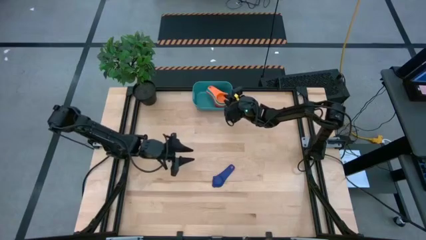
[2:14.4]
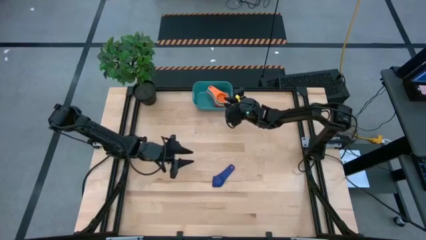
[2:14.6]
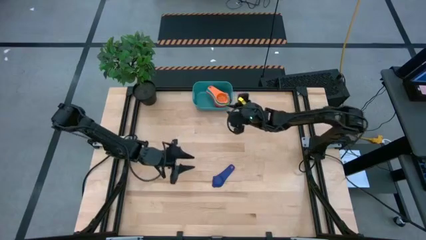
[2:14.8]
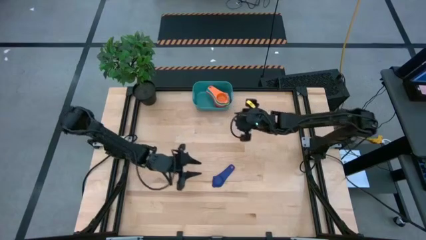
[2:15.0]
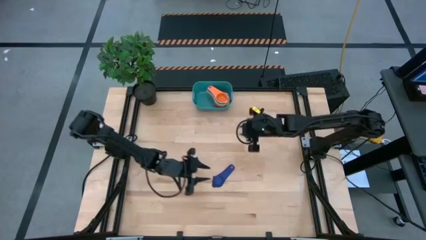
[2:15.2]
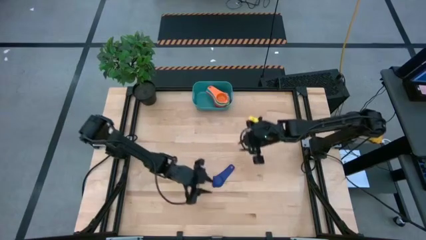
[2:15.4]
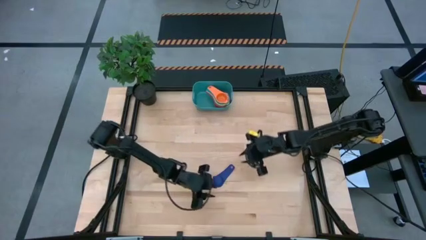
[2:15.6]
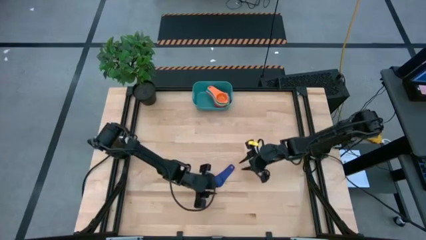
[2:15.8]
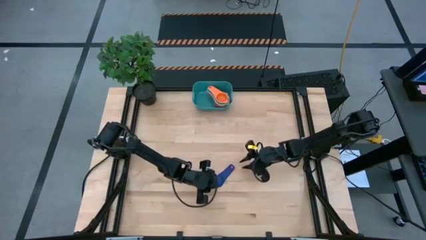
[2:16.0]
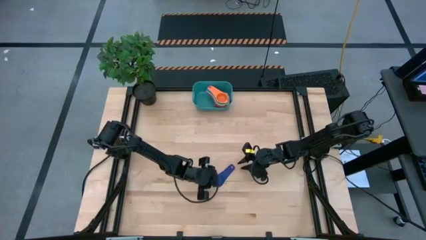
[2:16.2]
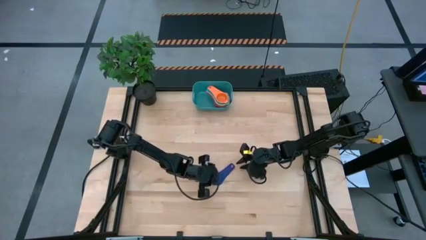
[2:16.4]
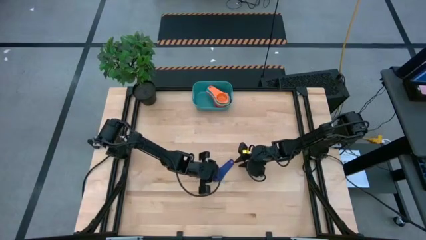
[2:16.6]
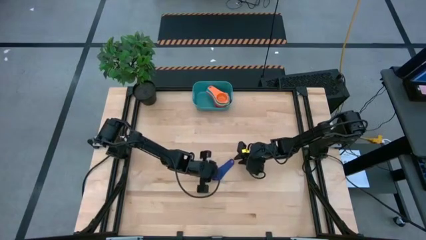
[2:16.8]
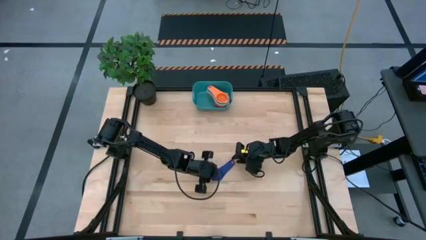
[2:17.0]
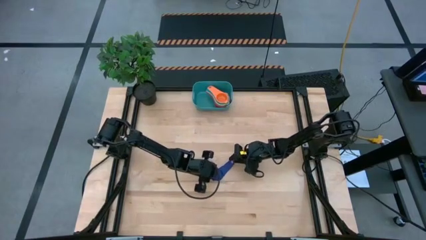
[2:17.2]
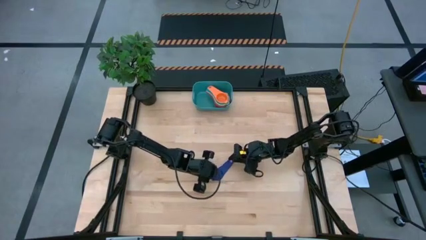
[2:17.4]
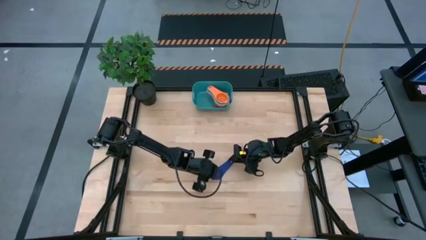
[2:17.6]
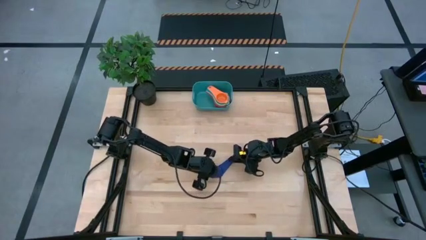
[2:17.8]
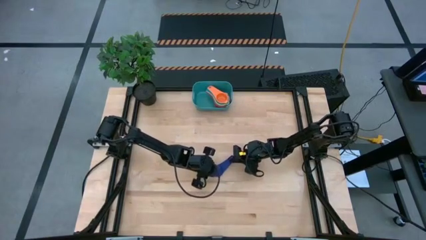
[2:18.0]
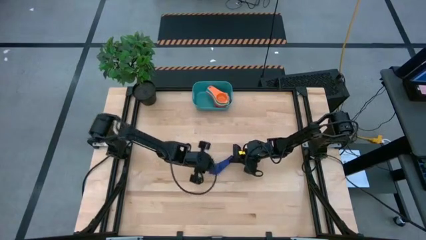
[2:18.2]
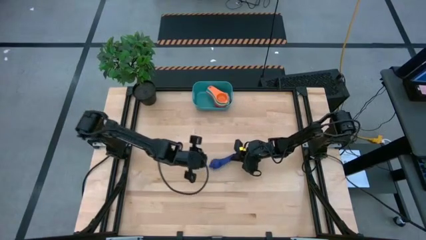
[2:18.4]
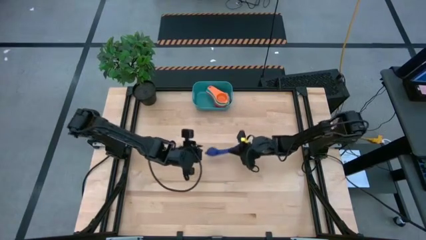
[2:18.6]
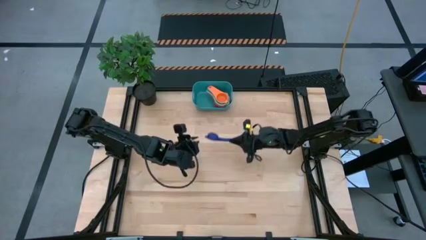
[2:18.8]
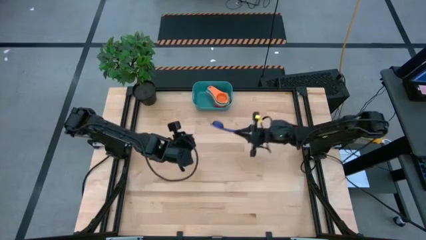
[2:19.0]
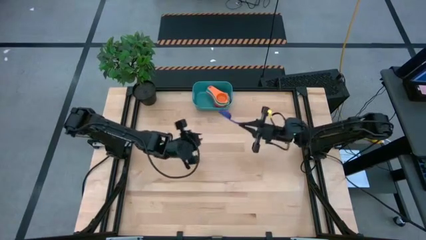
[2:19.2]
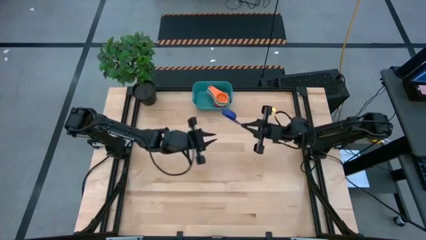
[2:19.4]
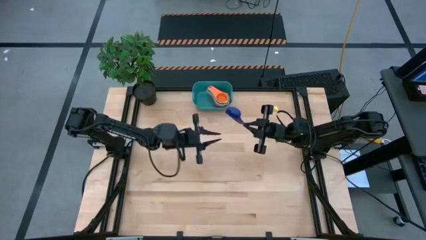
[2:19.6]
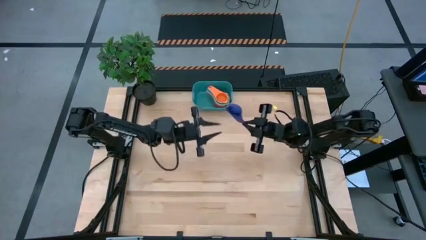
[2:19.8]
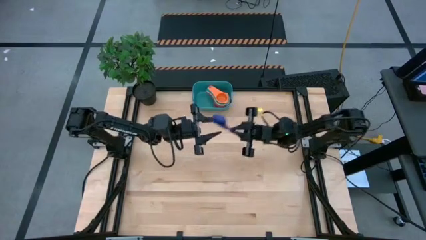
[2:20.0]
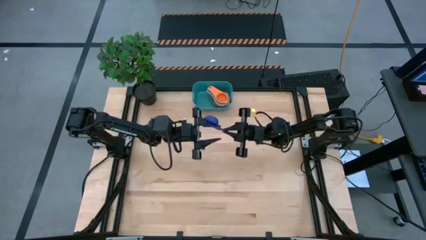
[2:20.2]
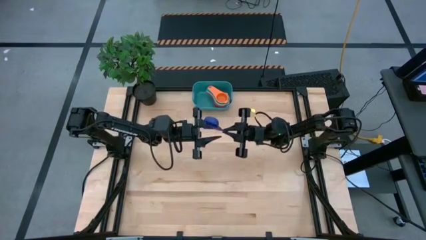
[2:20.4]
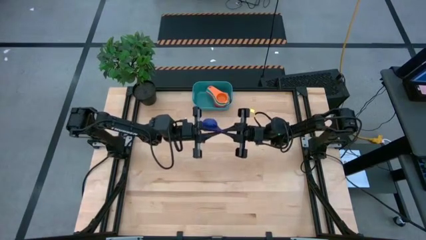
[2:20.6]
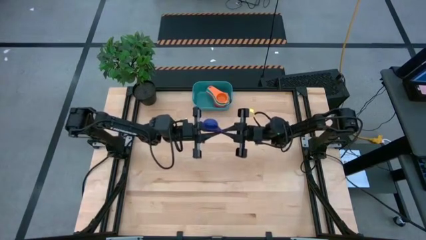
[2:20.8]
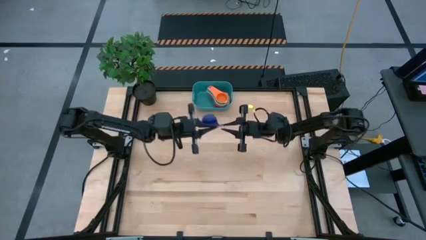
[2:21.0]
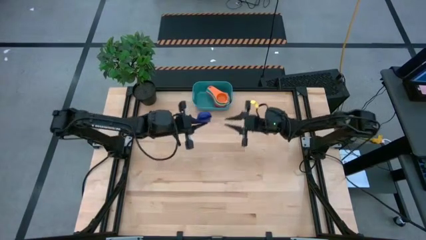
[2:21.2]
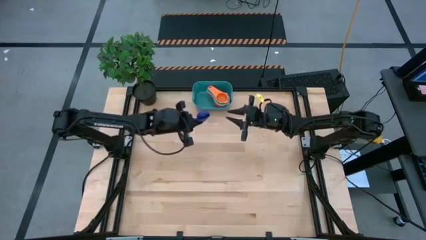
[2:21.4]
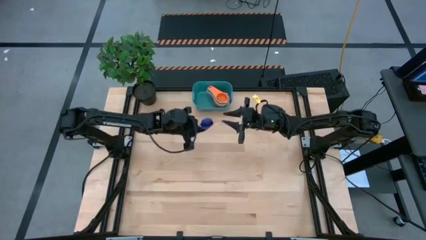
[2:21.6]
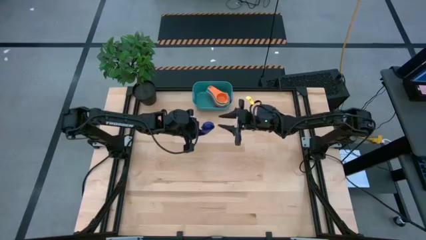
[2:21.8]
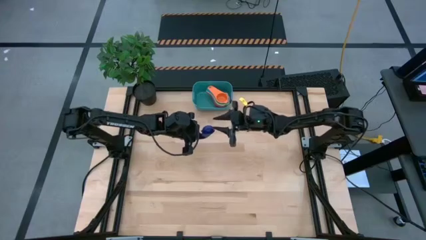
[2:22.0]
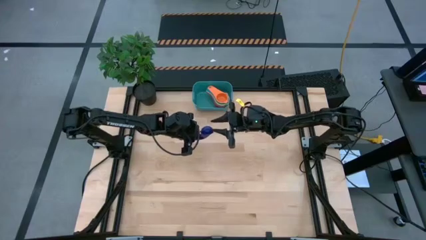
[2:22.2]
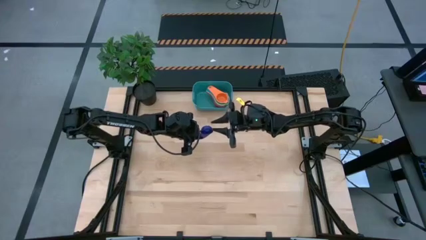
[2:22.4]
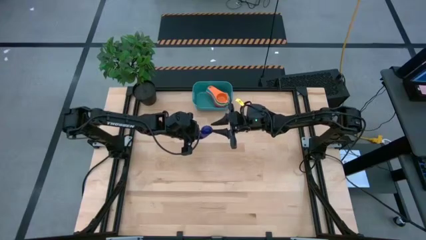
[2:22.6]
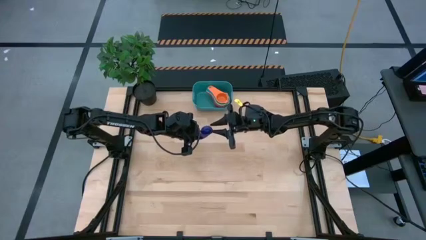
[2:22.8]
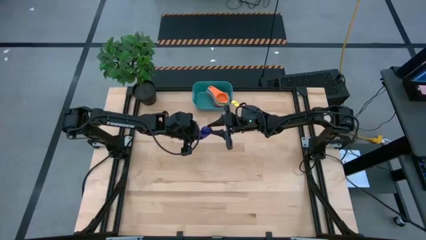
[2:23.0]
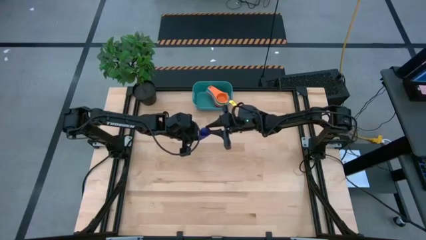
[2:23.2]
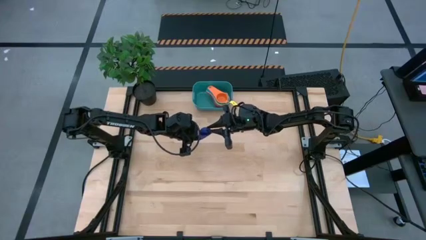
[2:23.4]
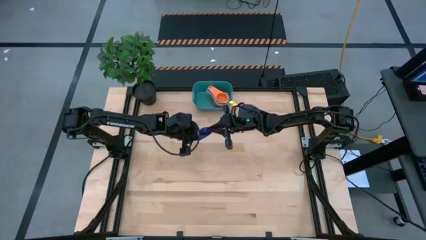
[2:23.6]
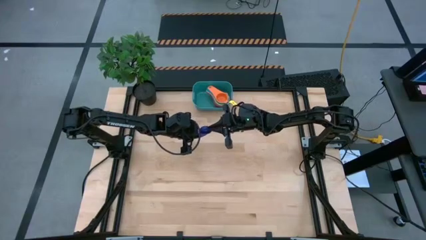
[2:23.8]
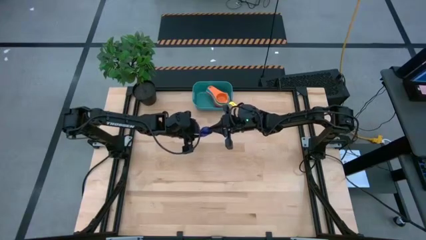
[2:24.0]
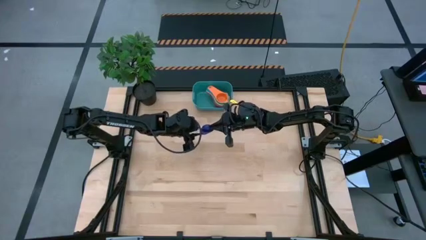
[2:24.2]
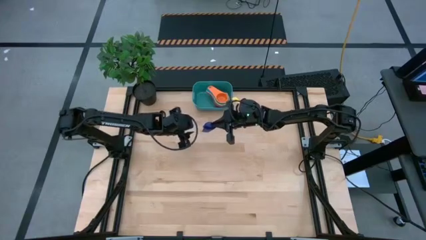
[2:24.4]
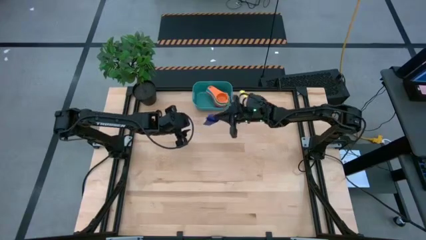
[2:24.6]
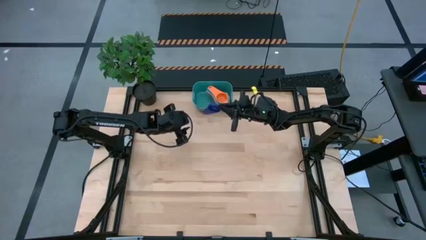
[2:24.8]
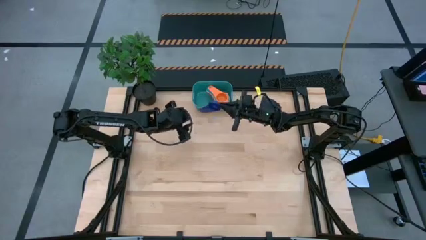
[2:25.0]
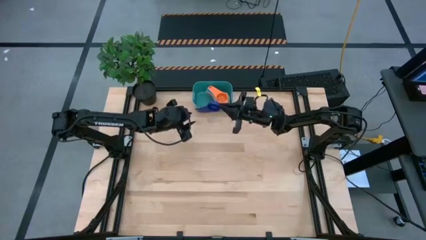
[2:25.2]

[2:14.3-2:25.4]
Task: Nest measuring cups in basket
Stack the dark blue measuring cup on top of the orange measuring cup in the blue bin
